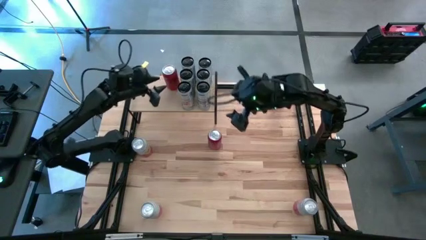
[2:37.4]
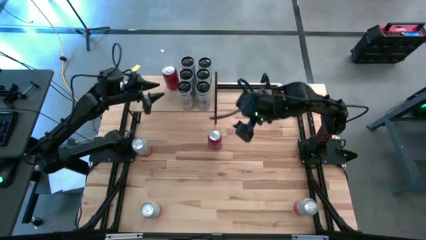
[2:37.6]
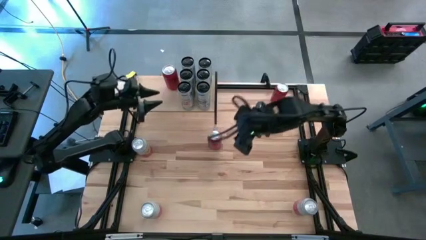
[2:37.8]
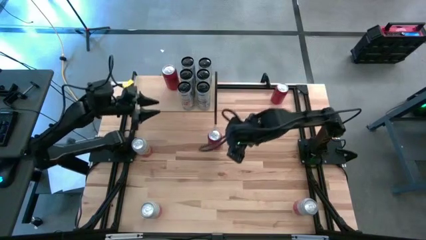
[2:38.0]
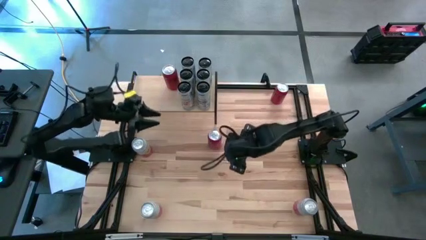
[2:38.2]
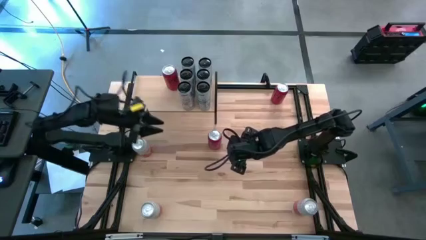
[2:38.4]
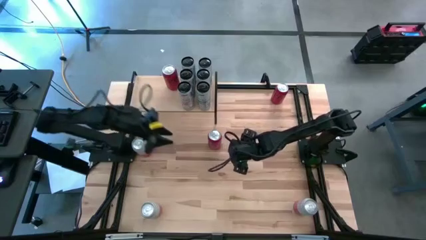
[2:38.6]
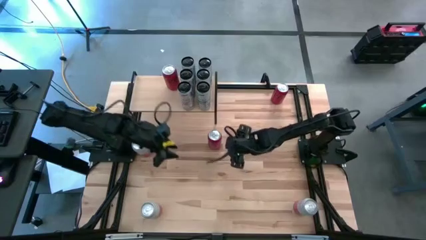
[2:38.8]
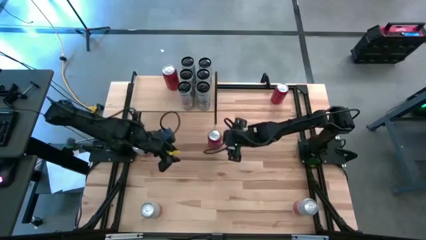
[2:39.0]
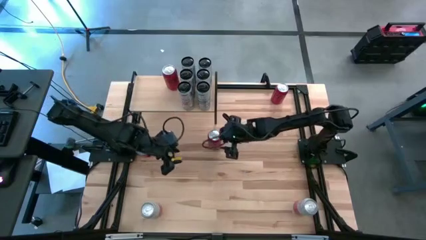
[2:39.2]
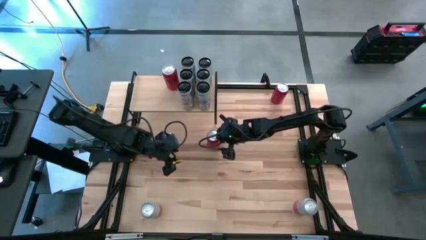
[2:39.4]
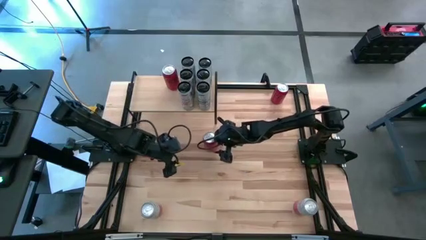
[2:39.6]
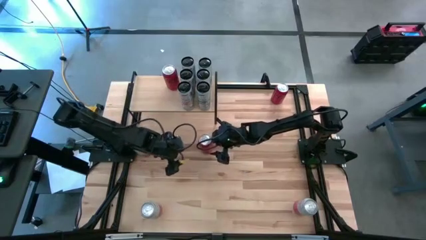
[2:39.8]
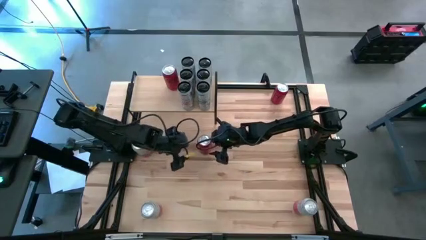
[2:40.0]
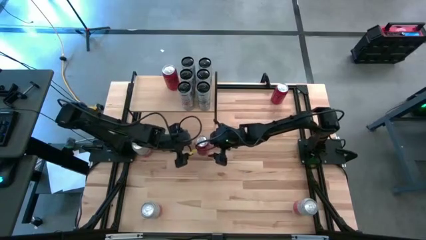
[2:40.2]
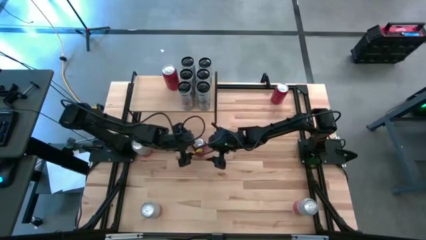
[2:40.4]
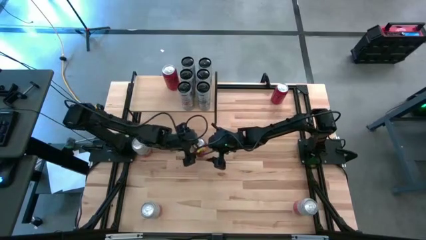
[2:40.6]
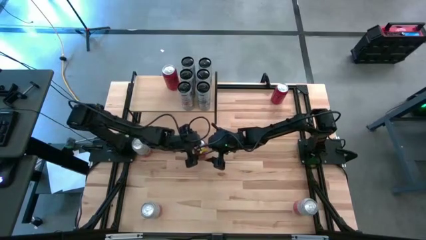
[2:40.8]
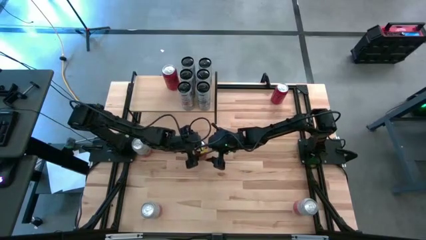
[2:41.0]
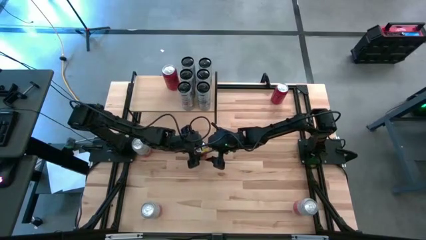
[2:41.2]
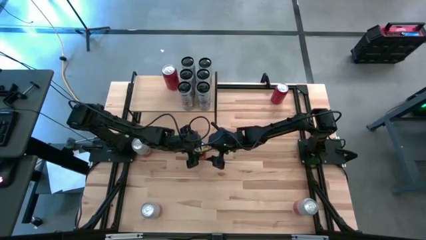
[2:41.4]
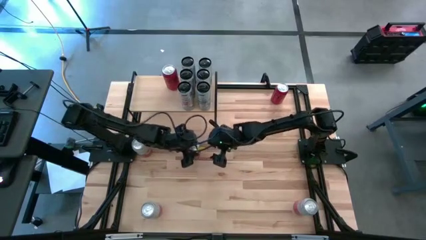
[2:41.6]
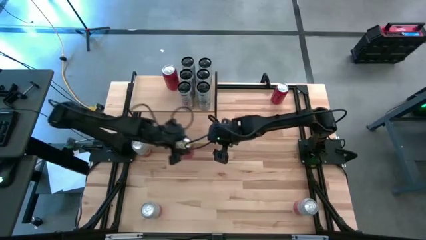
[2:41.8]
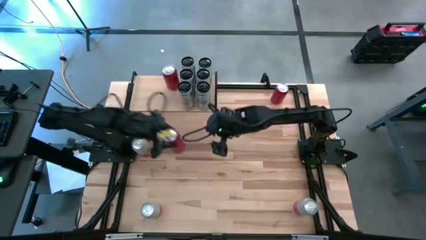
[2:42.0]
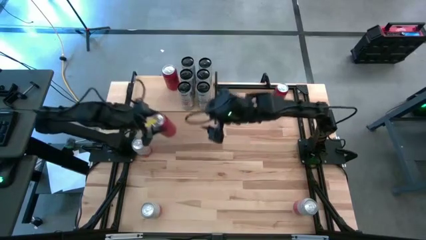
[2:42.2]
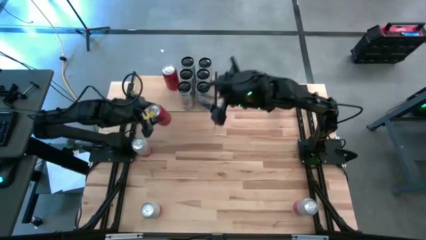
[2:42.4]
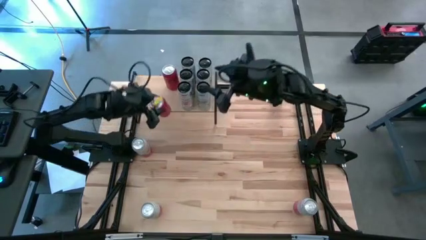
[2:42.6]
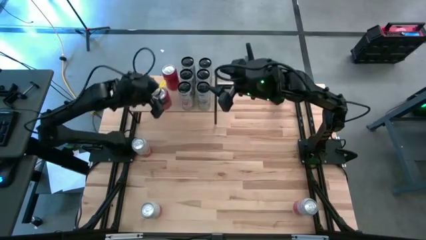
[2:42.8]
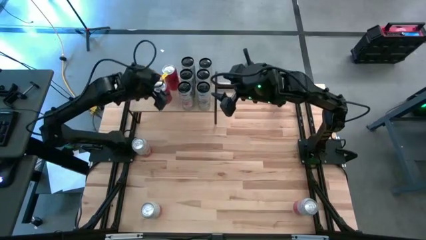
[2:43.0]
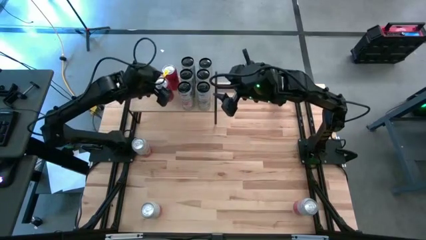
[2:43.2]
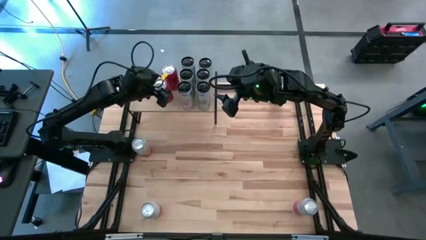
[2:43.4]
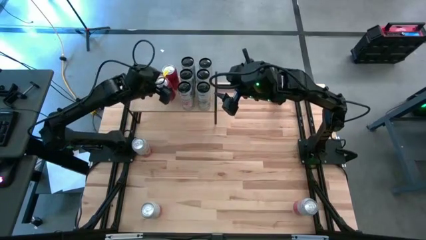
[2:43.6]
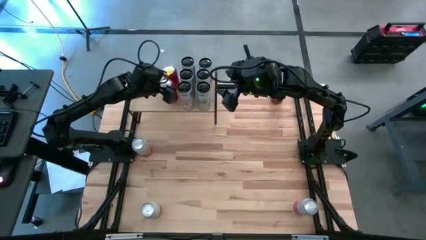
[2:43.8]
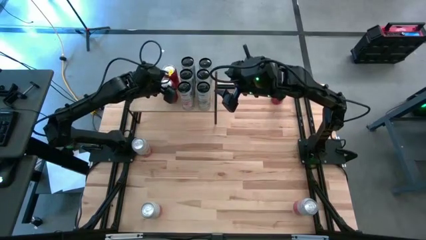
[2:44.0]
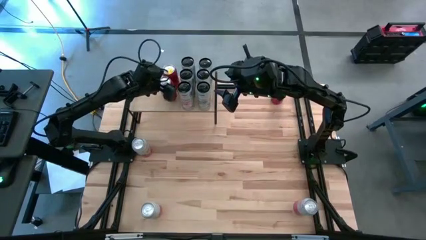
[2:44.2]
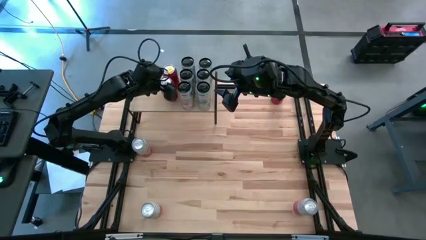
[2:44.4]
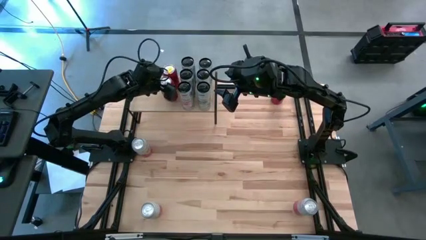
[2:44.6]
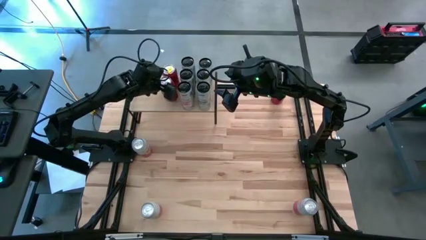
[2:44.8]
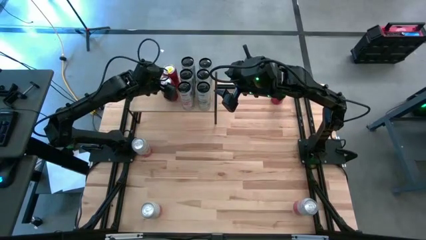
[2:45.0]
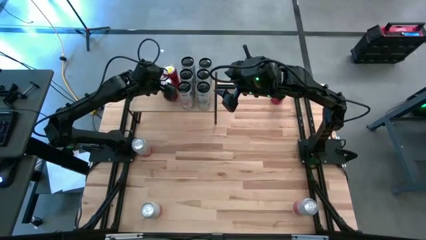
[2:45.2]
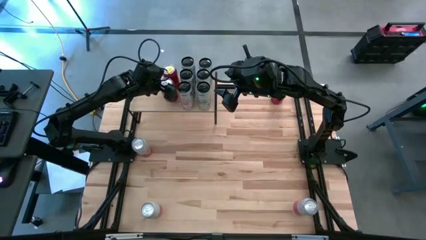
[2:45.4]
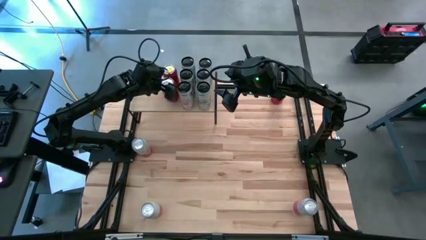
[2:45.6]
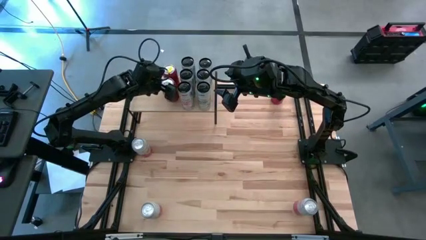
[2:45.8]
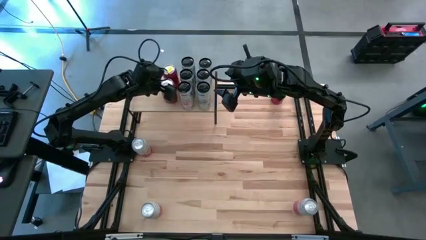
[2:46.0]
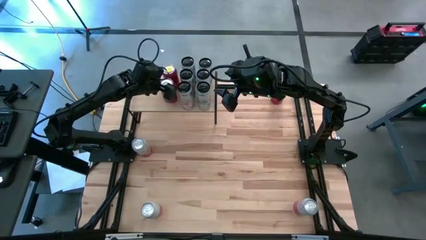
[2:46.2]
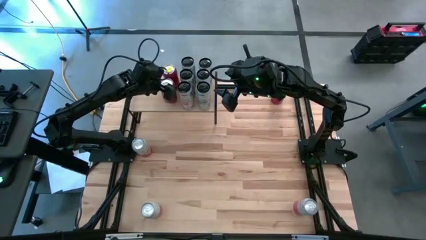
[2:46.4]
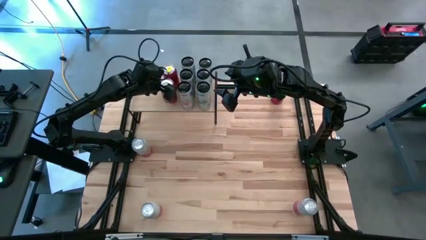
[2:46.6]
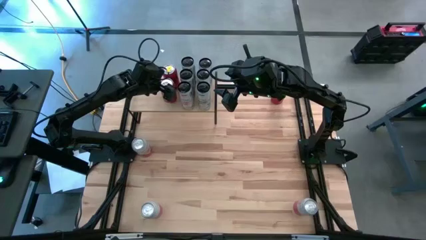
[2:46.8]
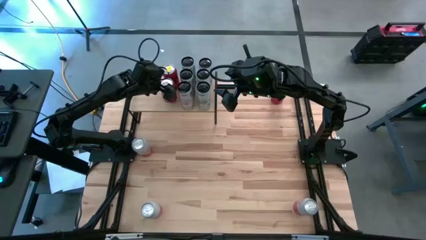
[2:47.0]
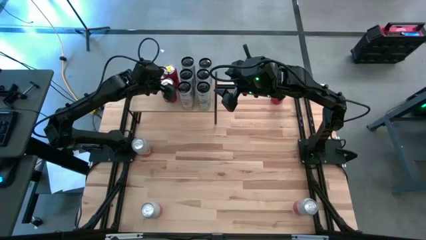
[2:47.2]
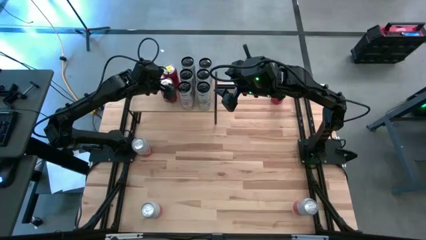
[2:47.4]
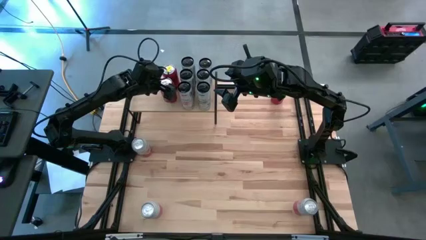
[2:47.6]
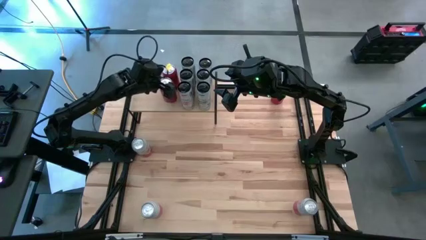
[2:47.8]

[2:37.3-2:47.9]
Task: Place canned beverage on shelf
Put the bottom red soda can on the shelf aligned with the other red soda can

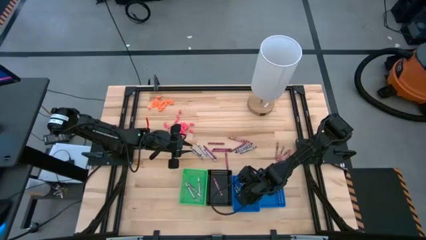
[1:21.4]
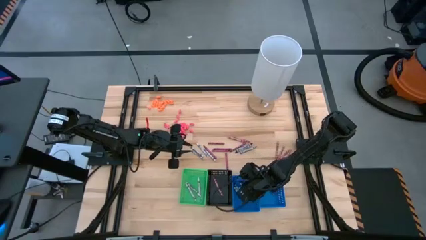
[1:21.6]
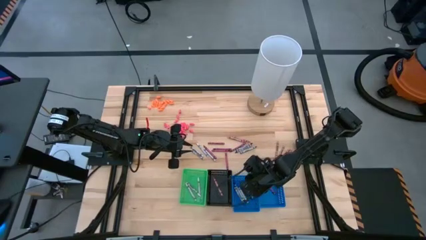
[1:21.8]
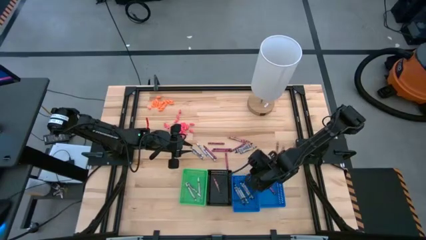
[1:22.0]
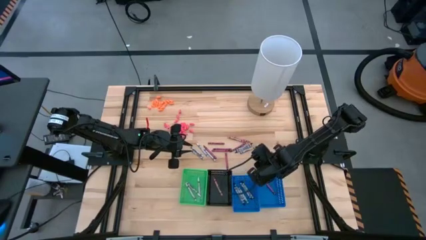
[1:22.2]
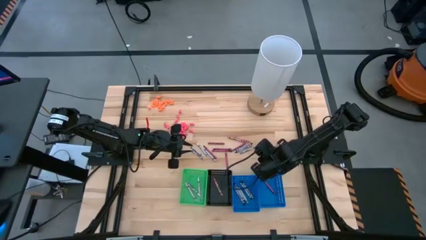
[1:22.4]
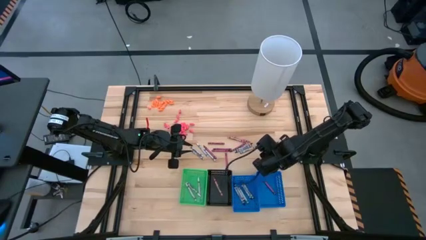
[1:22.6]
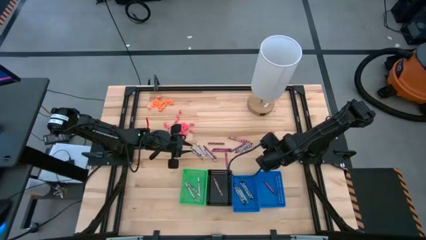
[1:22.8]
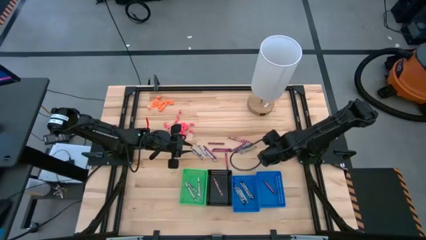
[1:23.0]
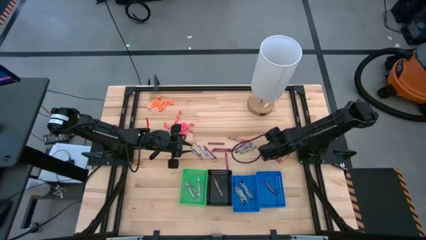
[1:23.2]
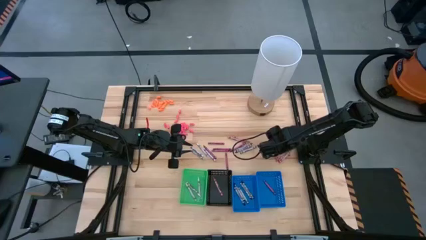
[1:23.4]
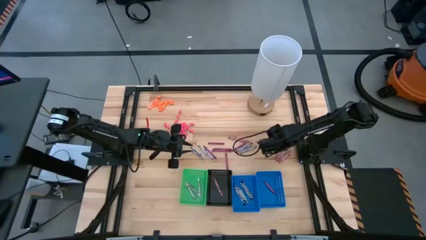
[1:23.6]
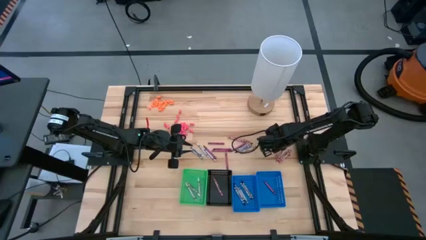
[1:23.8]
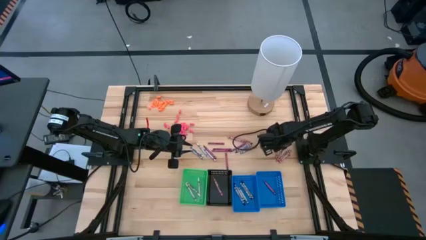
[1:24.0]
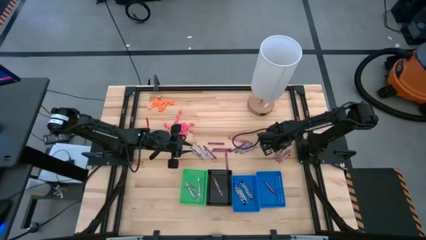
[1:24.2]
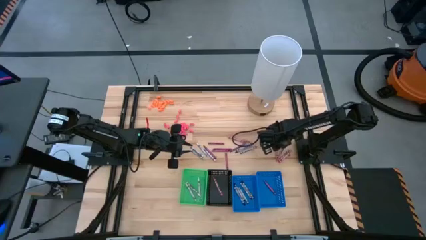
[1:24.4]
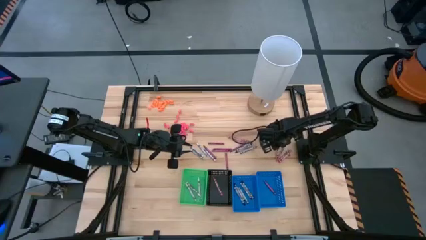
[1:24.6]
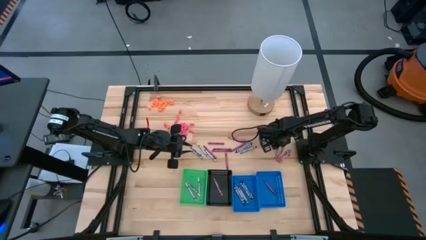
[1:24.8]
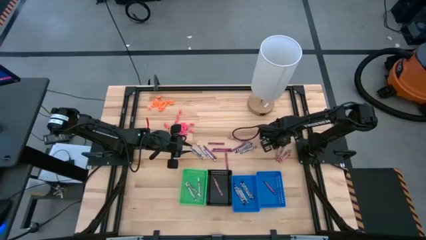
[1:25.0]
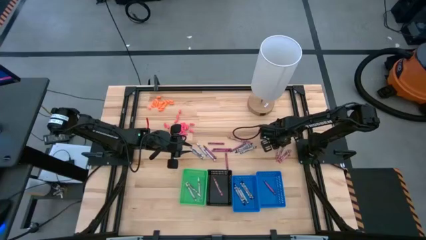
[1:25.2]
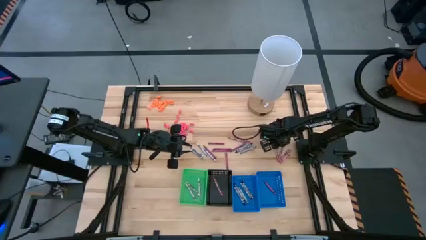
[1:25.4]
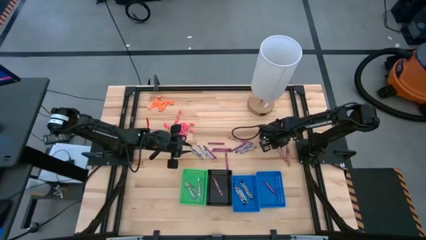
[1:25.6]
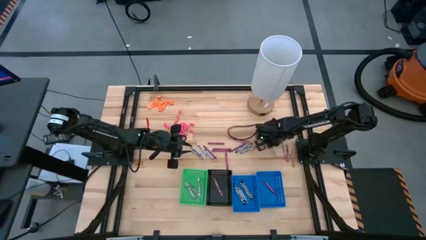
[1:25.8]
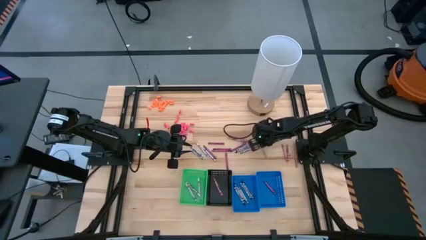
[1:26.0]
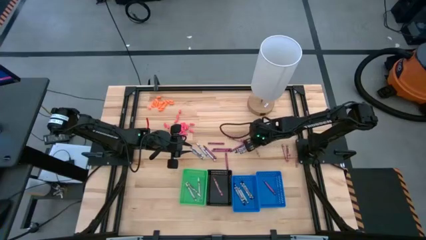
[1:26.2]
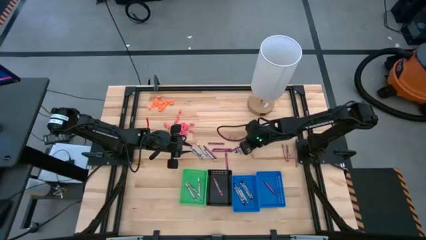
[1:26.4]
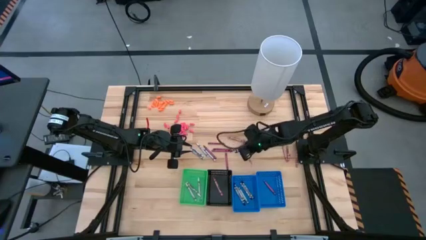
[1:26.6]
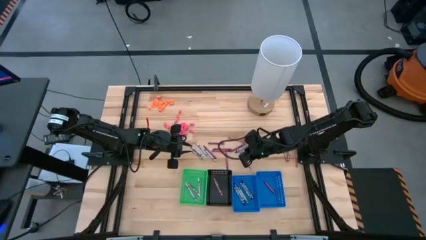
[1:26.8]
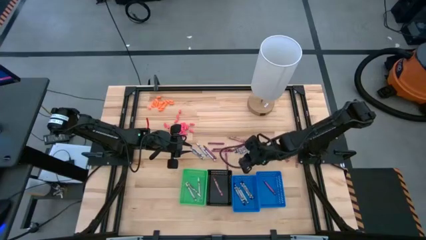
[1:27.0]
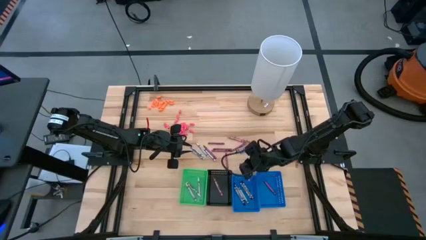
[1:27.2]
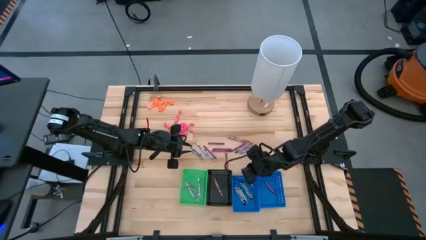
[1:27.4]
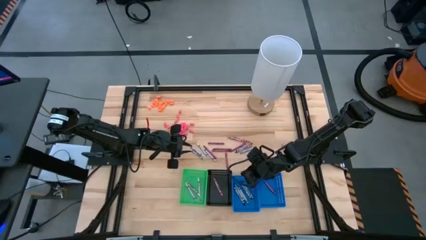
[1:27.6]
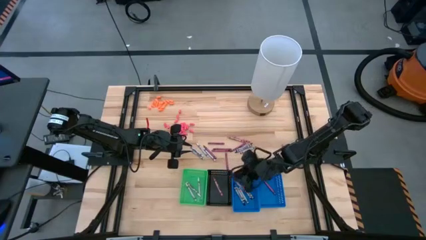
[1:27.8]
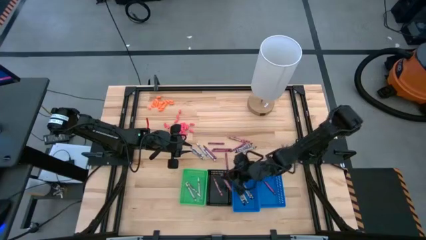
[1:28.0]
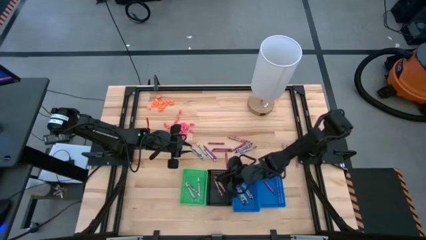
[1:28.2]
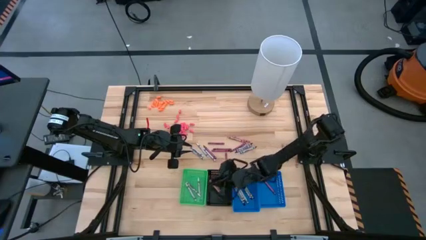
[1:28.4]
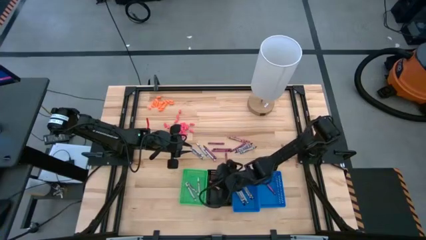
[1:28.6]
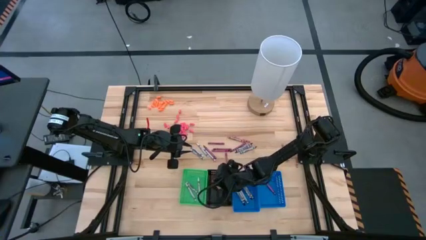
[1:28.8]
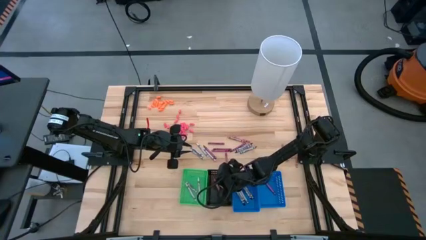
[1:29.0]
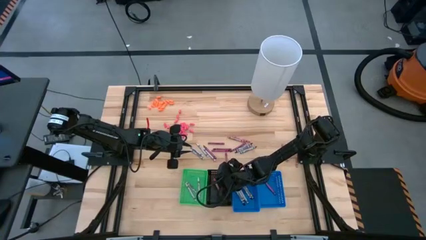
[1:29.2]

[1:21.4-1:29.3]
Task: Sort crayons
Put the pink crayon into the black bin
